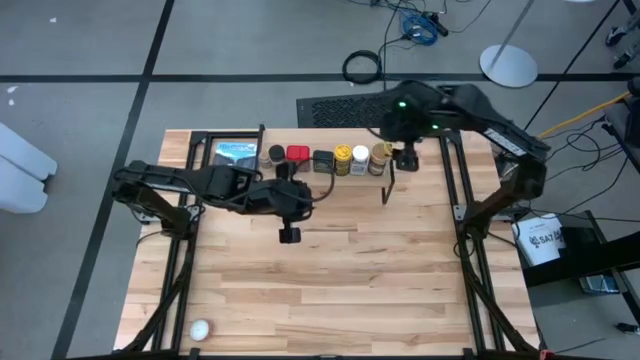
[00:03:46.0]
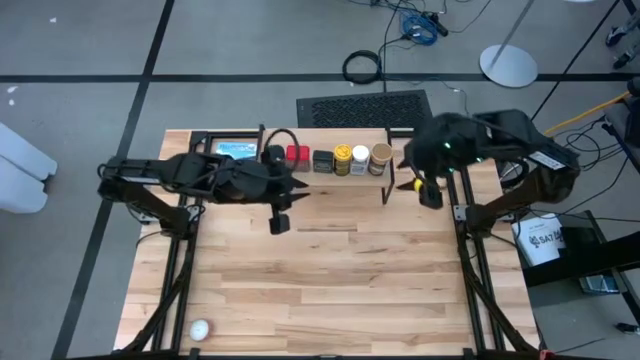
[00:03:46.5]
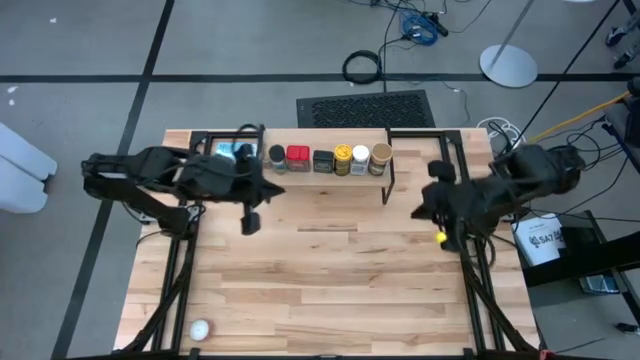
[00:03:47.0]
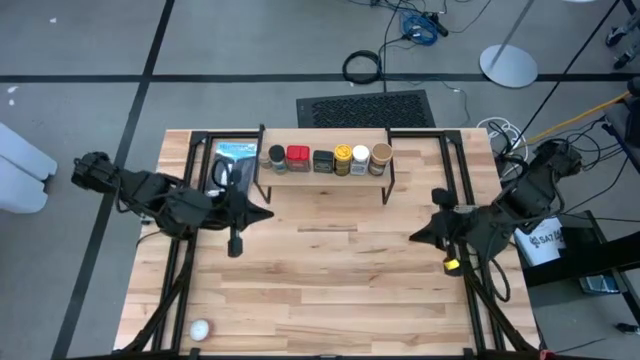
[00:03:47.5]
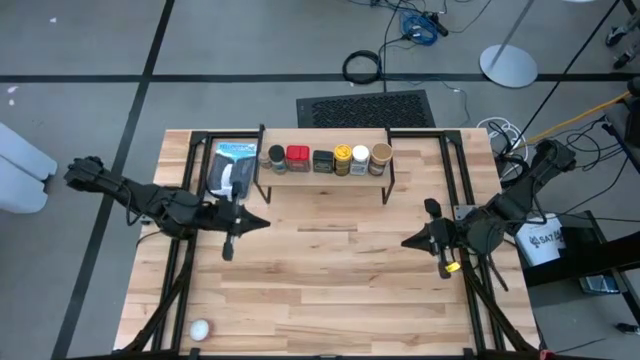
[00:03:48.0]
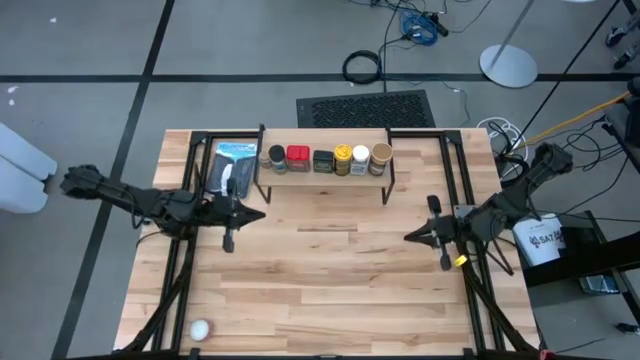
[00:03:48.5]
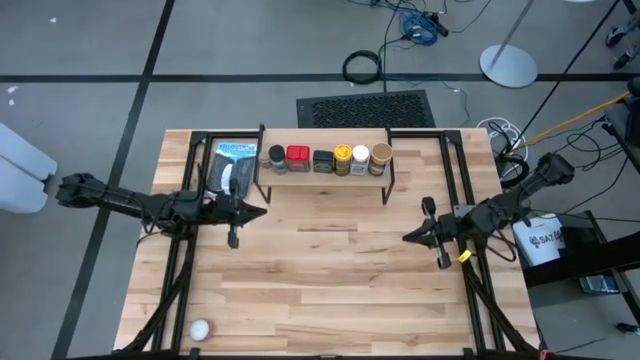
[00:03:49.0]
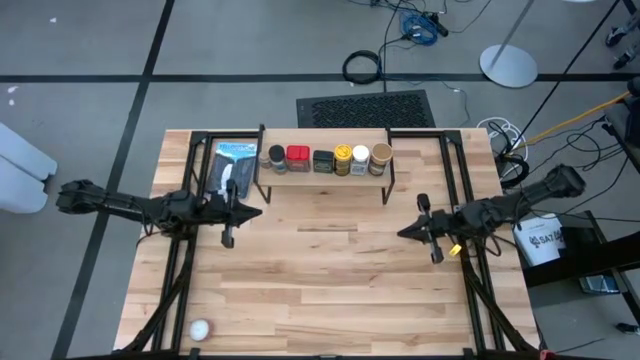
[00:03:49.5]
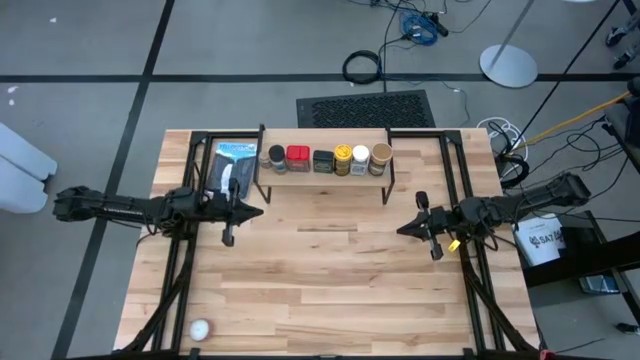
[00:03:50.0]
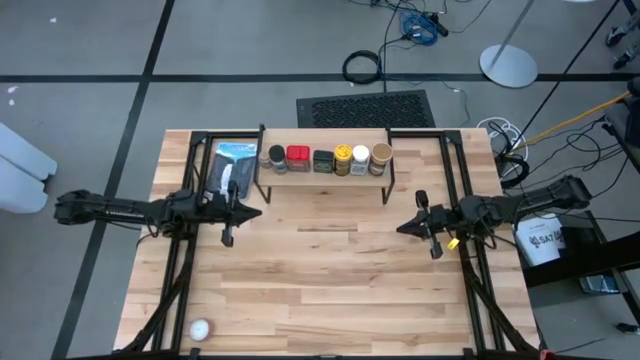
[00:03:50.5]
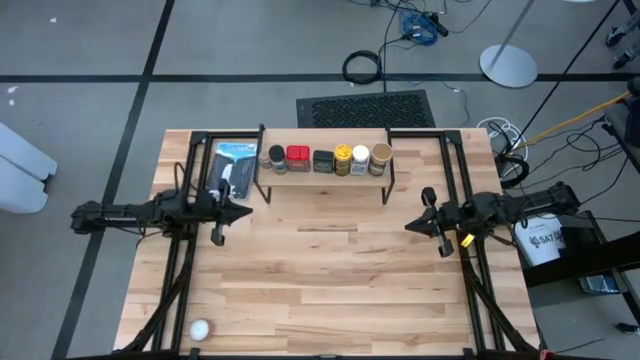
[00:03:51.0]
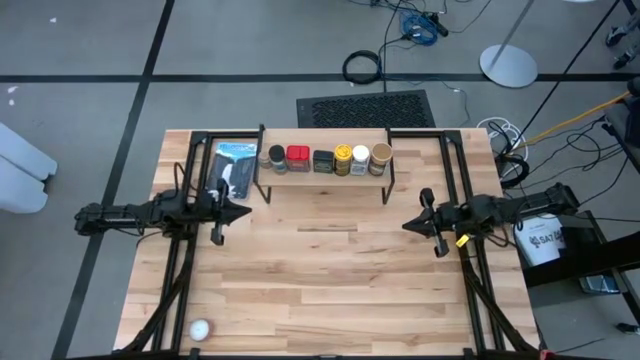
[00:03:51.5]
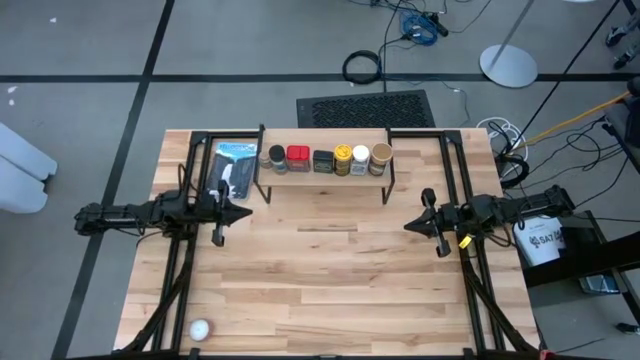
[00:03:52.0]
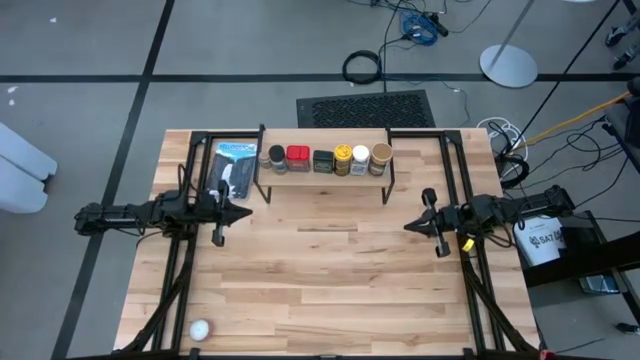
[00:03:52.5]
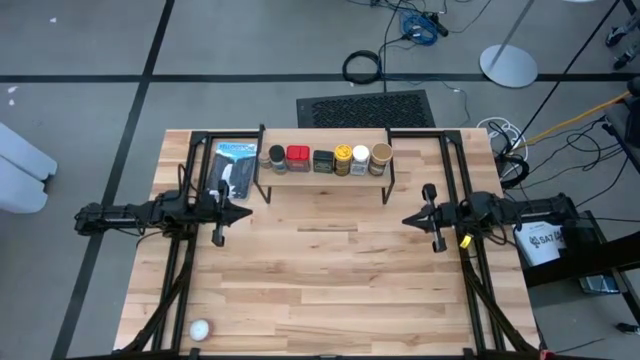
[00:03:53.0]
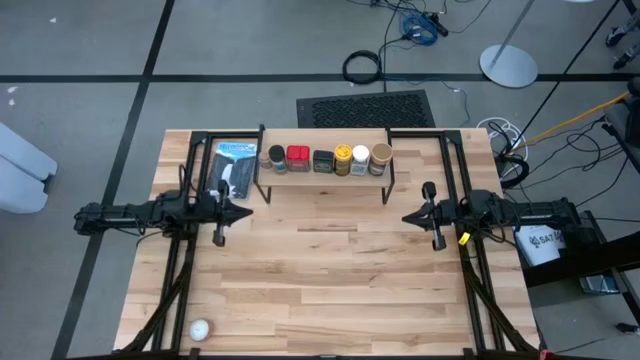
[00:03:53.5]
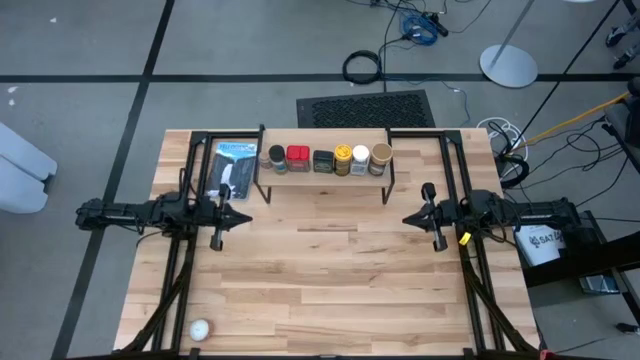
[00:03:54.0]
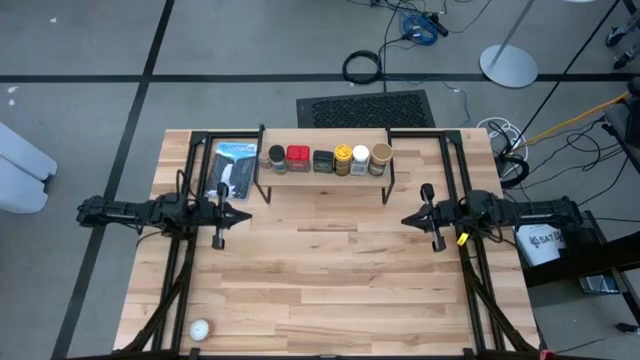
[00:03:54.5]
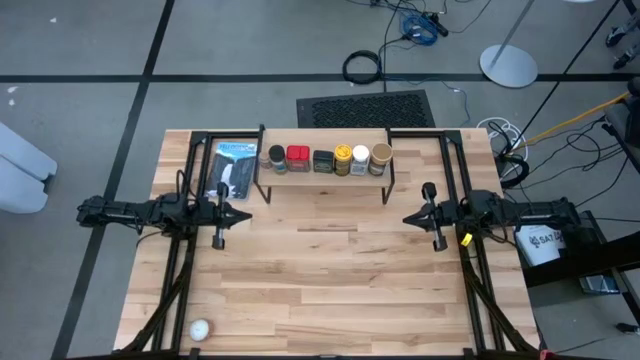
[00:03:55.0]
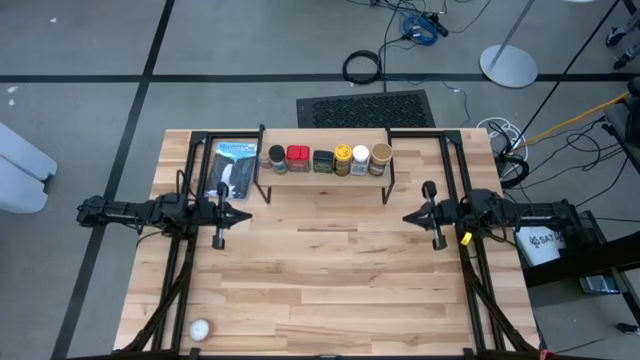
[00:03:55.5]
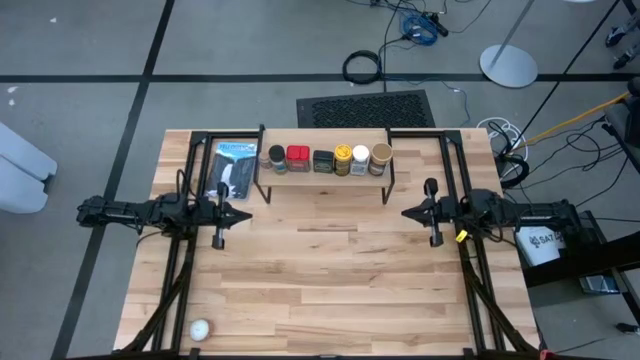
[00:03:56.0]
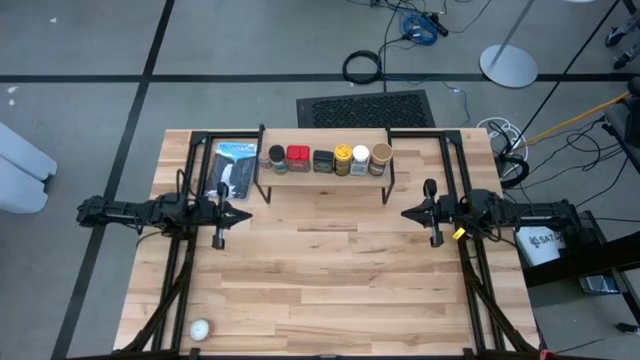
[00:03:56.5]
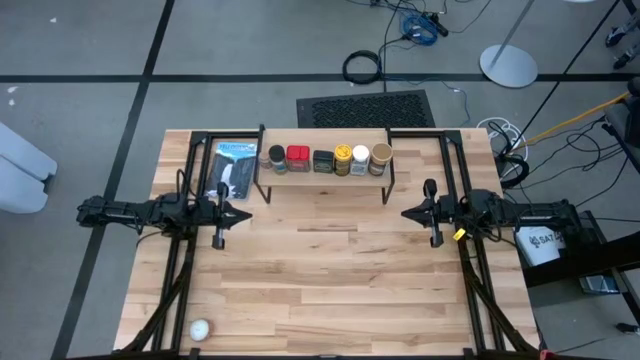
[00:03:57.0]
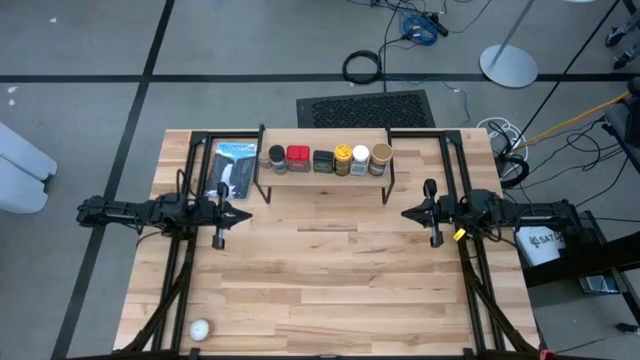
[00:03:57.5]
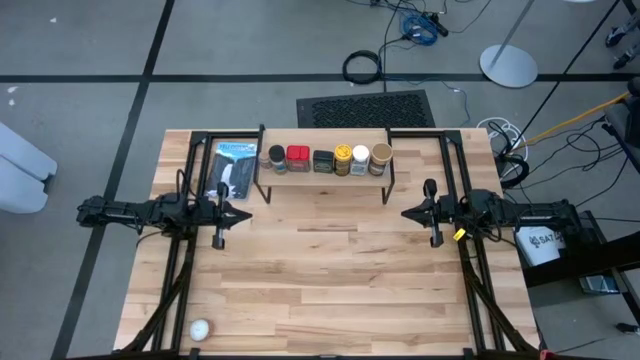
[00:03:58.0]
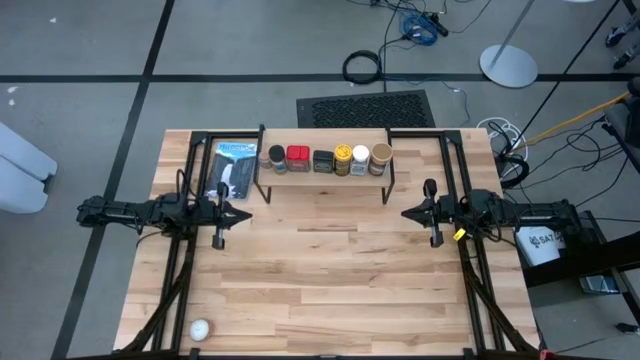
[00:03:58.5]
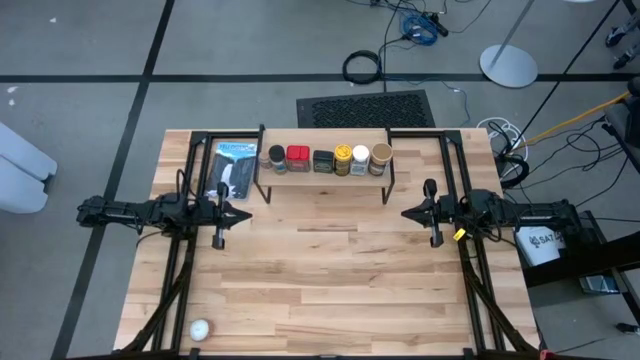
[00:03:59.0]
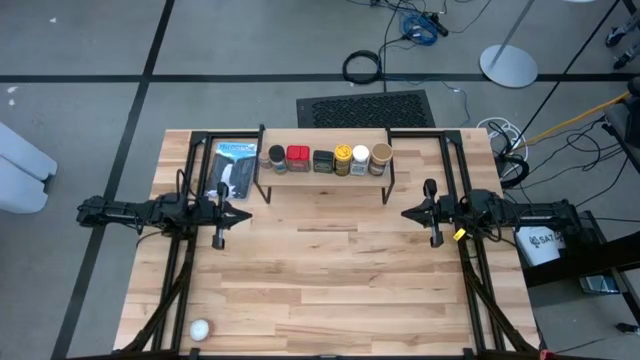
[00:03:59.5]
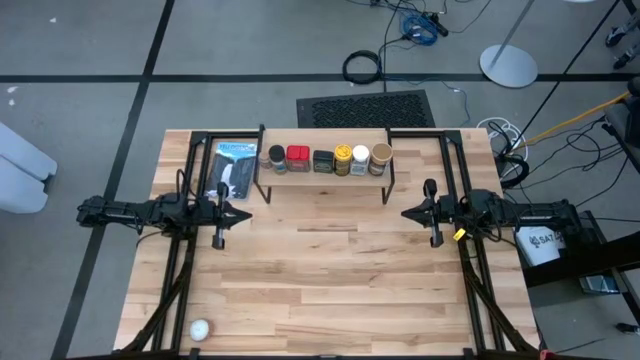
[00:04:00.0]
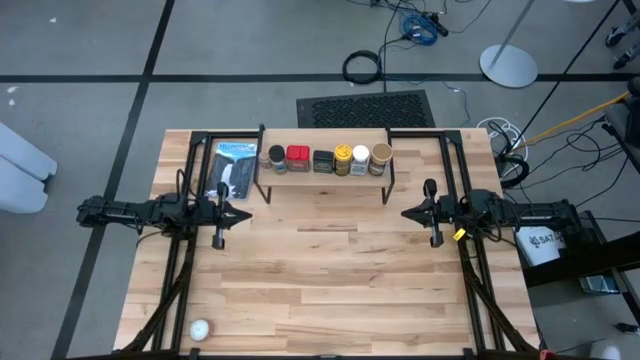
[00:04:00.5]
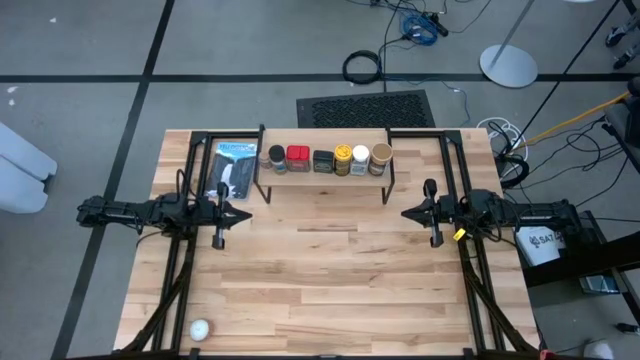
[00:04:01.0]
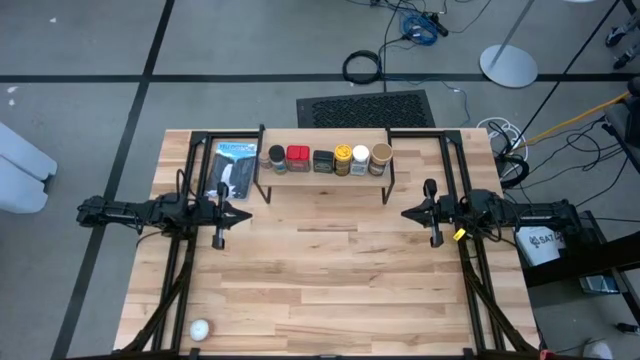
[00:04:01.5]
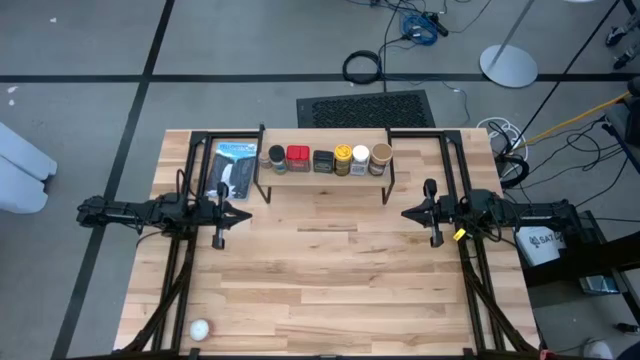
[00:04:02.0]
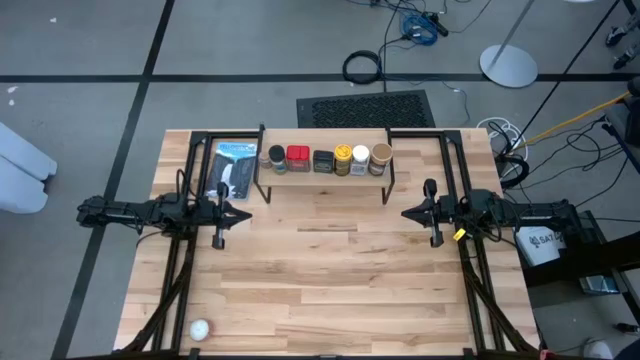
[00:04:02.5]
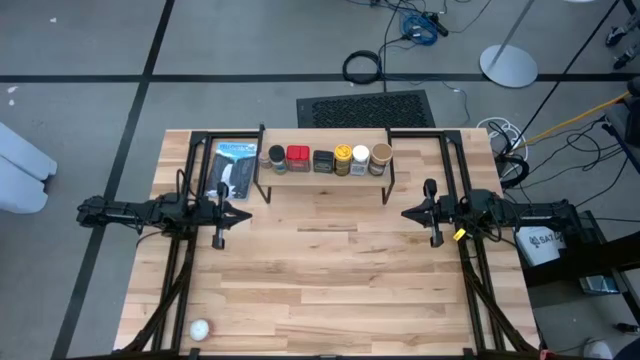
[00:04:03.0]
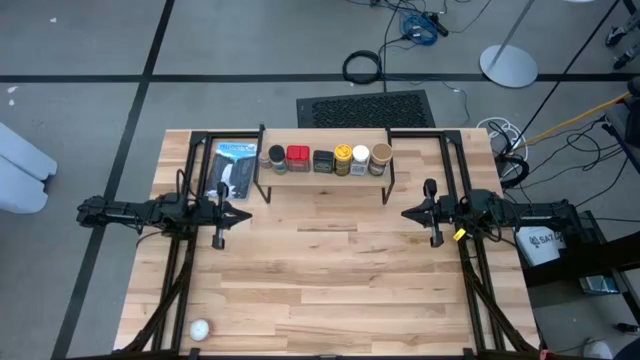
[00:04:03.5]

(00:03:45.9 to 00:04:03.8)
Task: Shelf spices
Return to Home Position

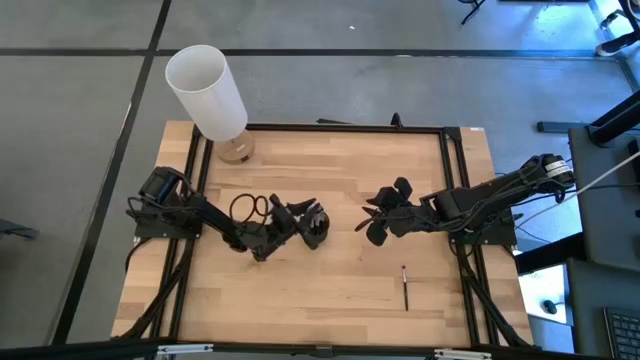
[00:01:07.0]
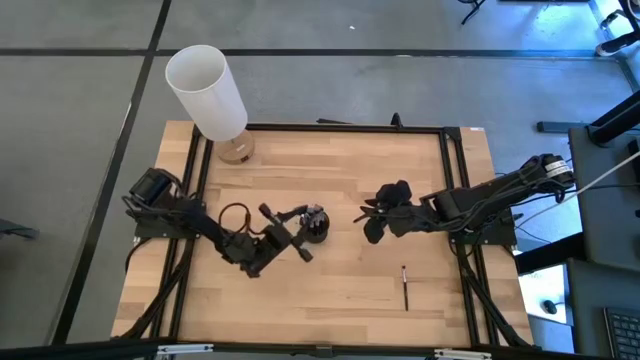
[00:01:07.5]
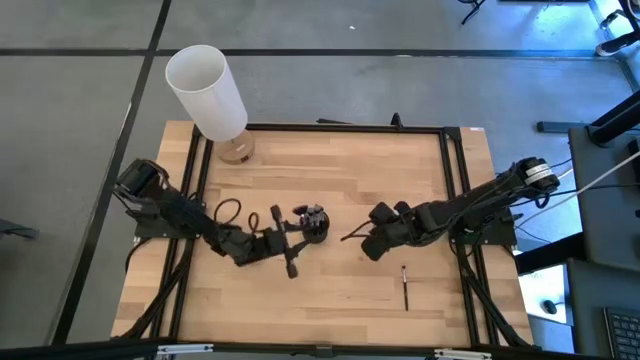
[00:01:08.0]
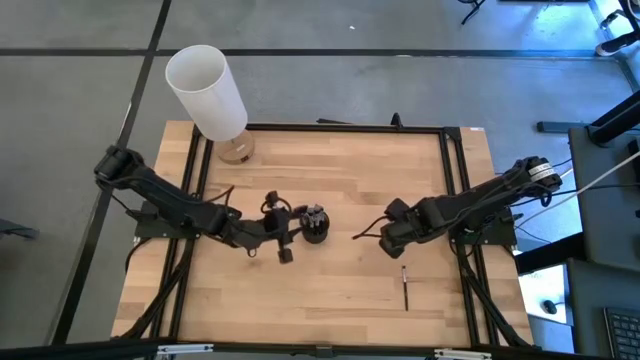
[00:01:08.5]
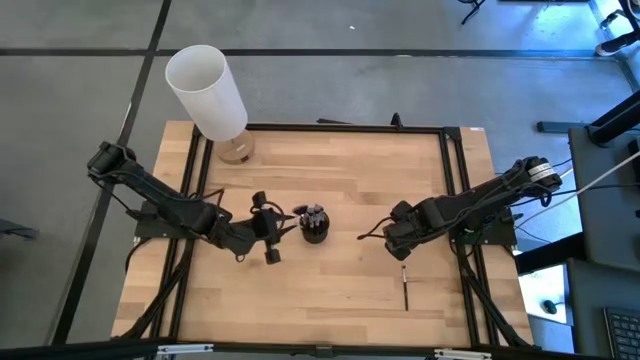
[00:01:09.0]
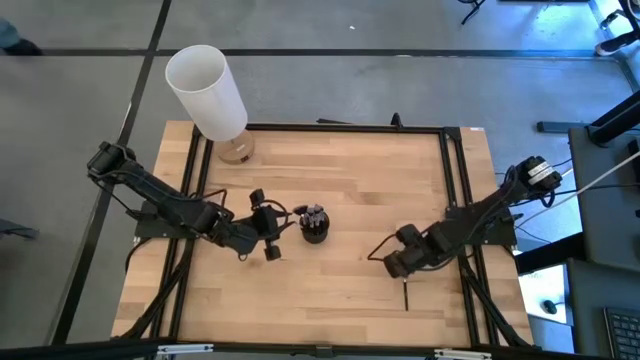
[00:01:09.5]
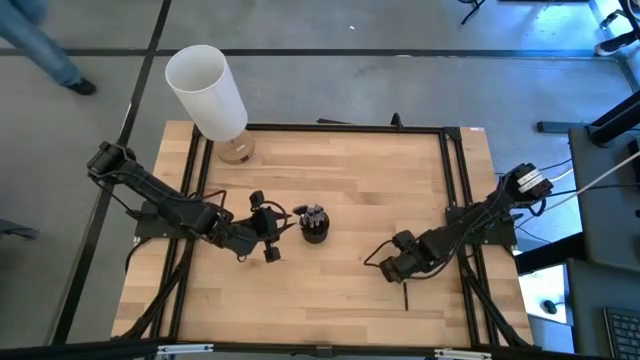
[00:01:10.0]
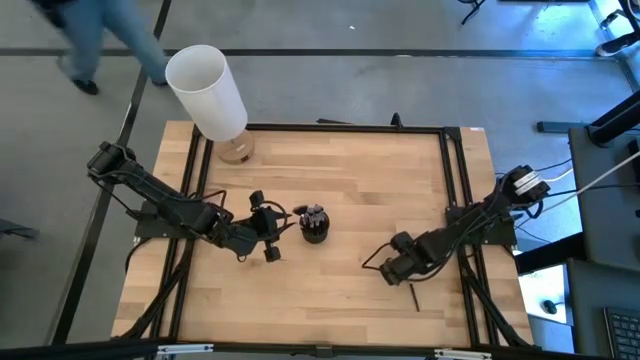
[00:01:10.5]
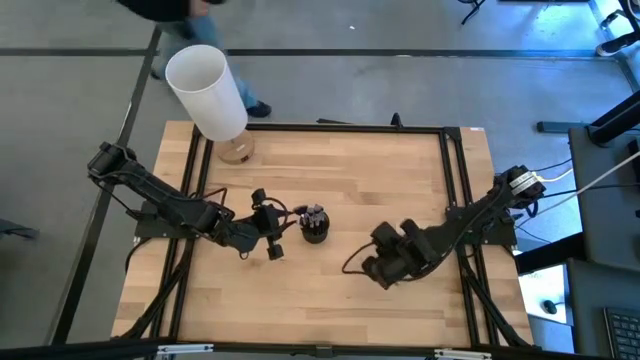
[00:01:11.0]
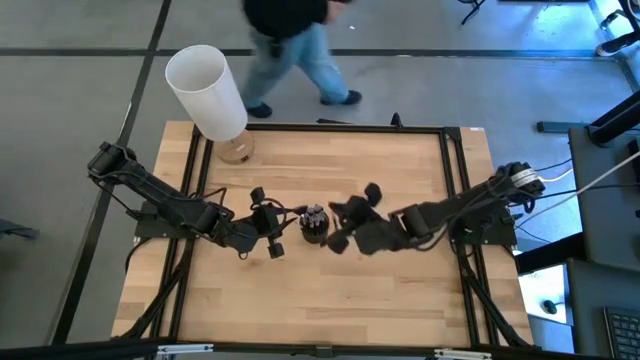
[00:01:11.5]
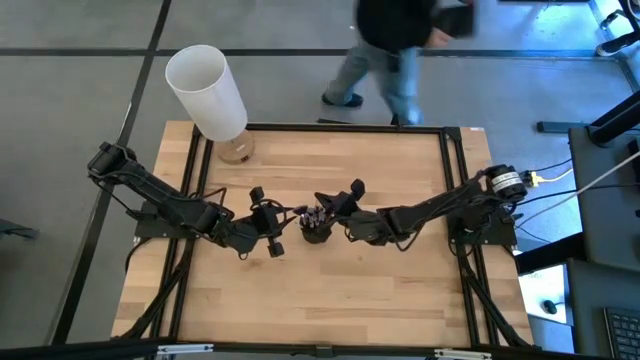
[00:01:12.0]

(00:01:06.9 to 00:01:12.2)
Task: Sort items
Put the silver eyeshadow brush into the pen holder
